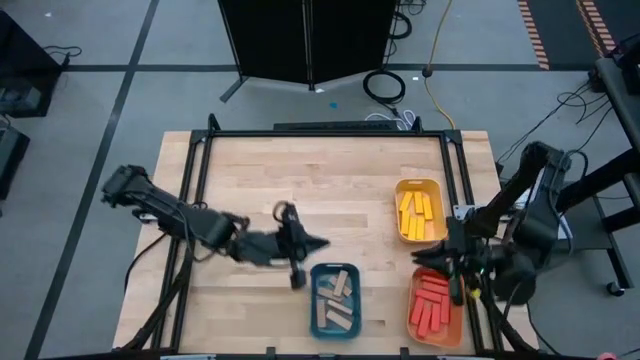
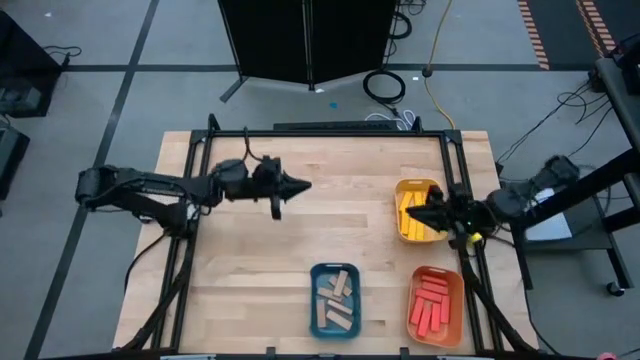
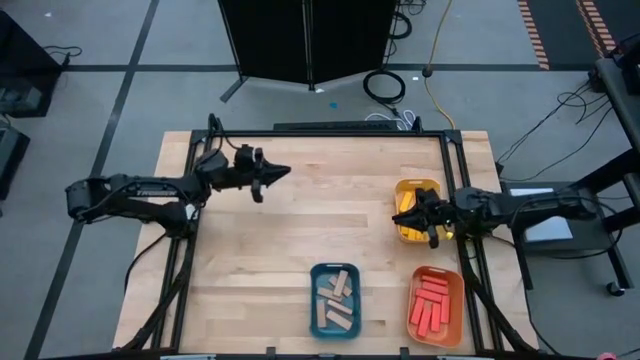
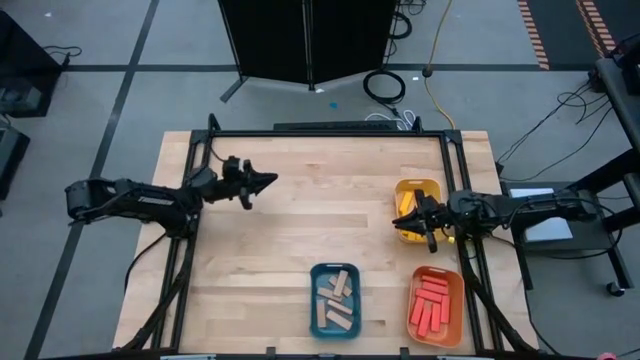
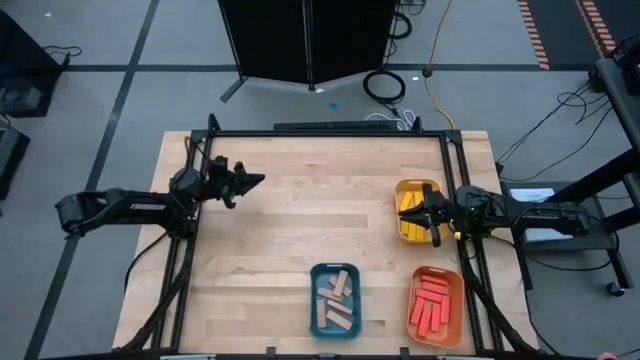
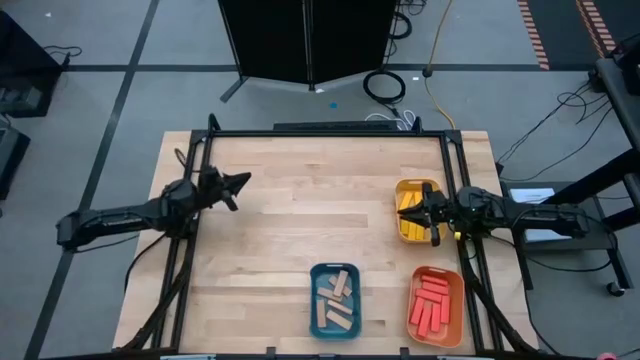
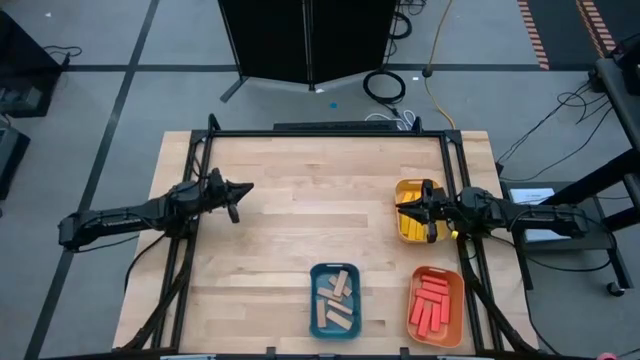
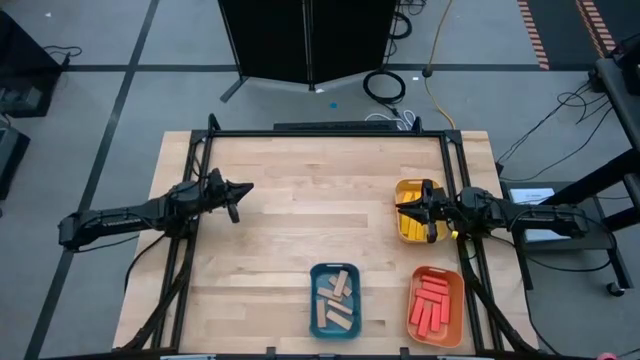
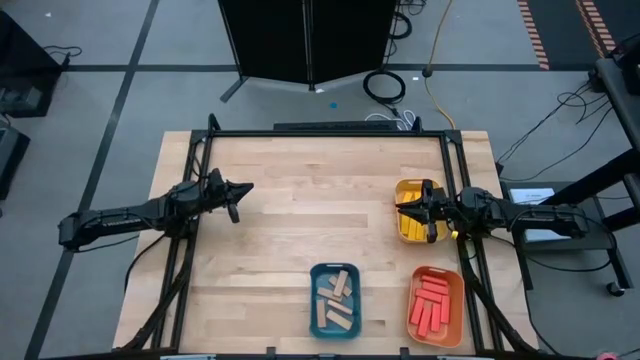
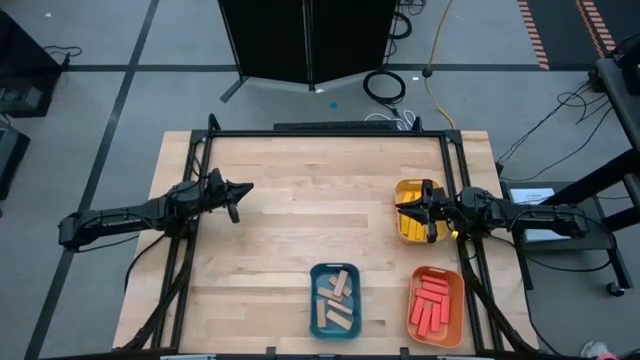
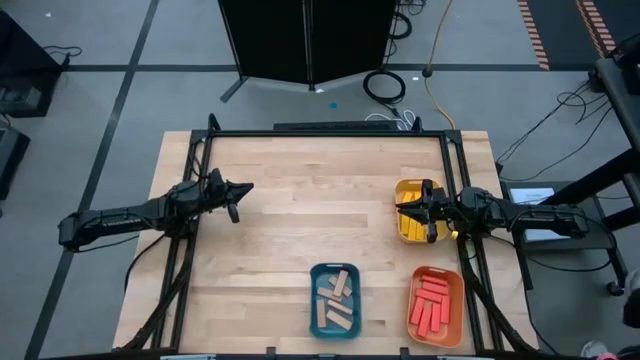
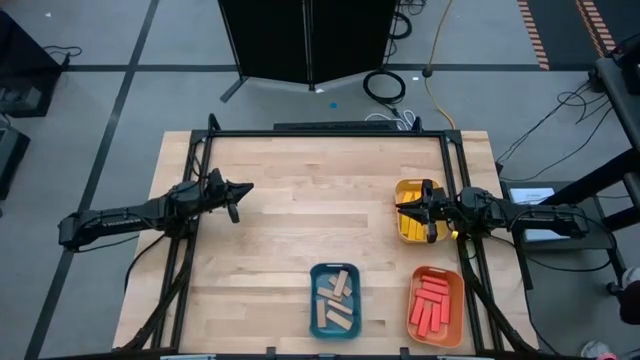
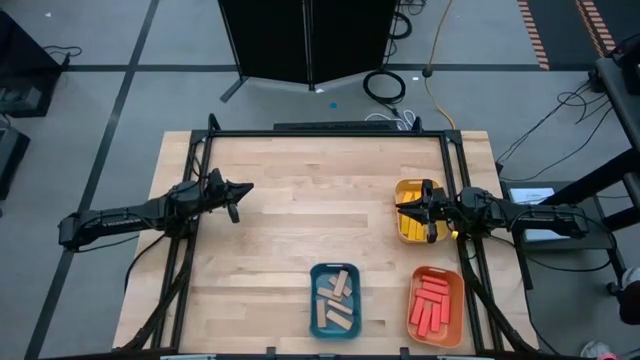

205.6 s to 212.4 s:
Task: Sort blocks
Return to Home Position

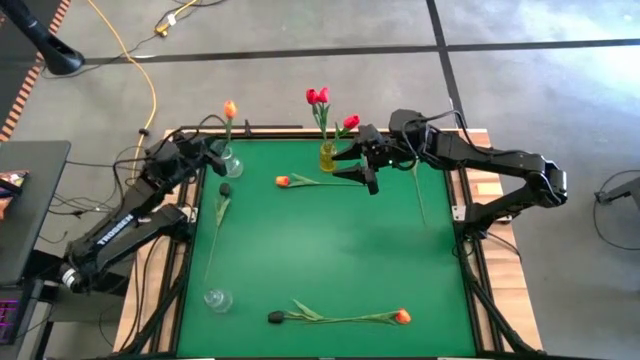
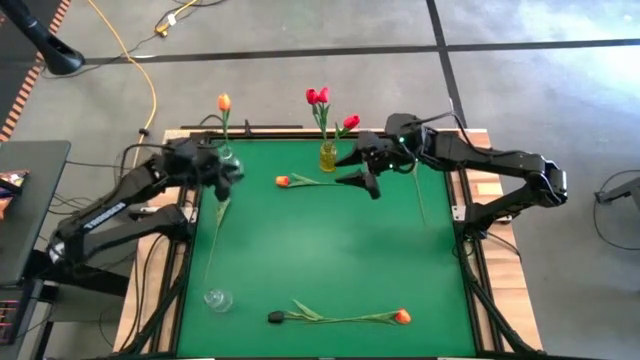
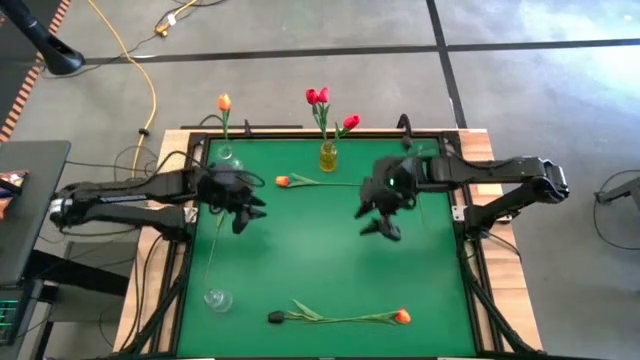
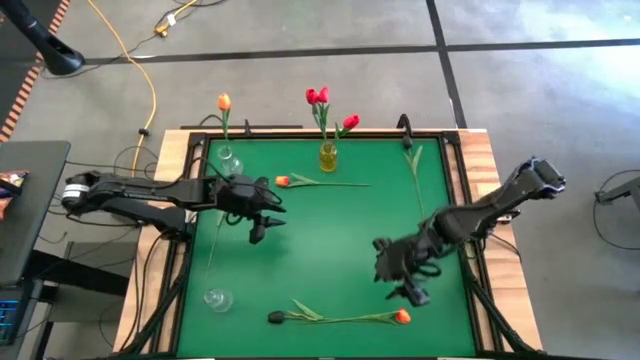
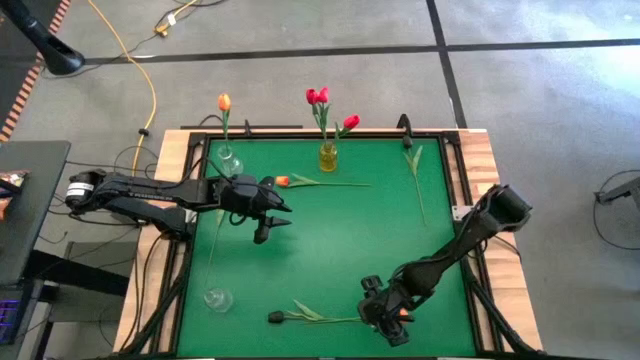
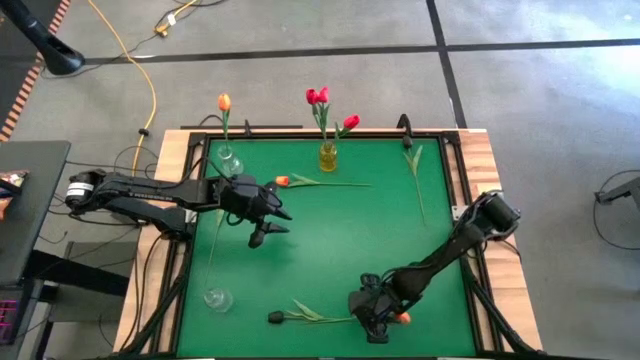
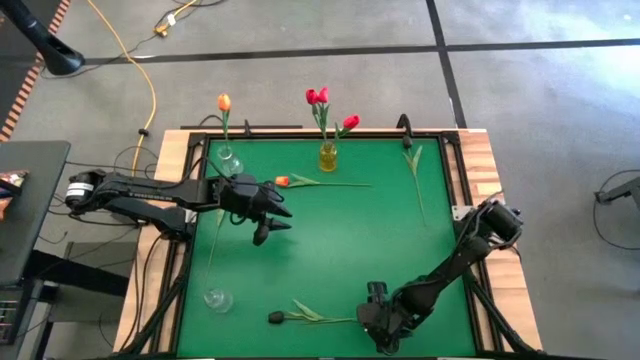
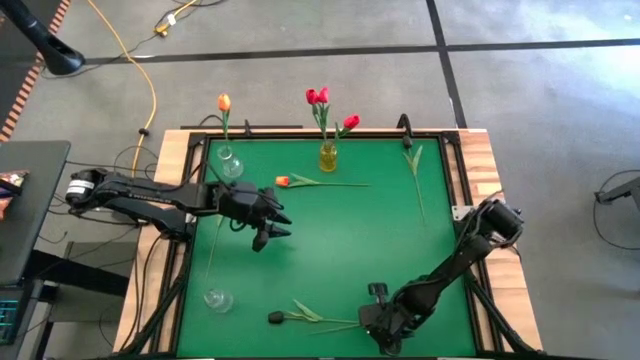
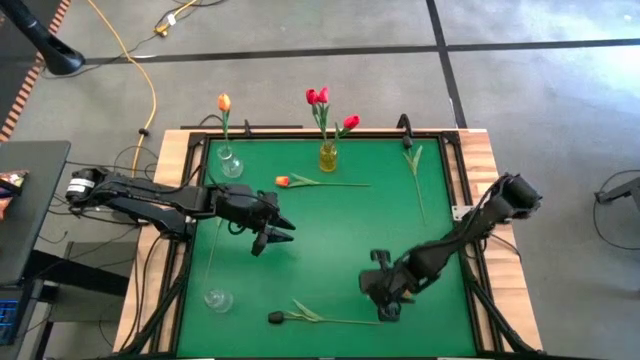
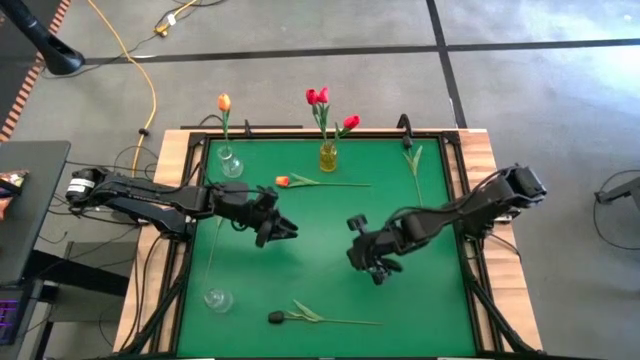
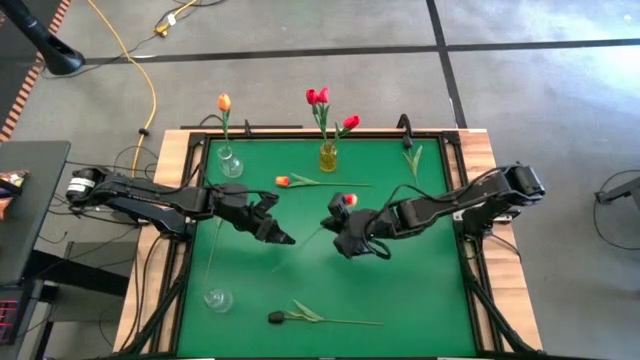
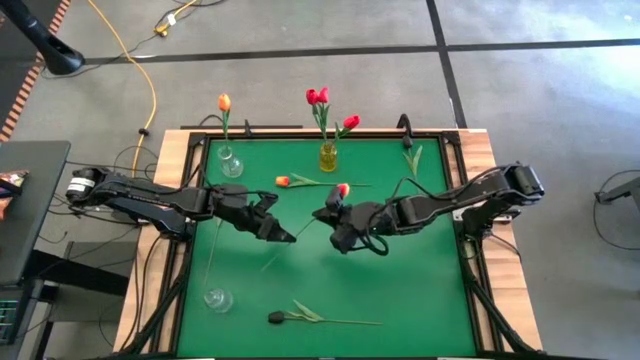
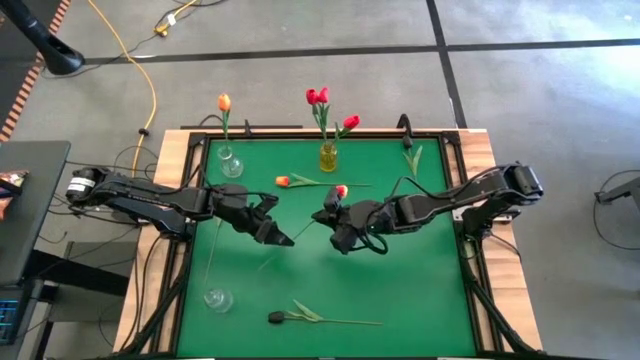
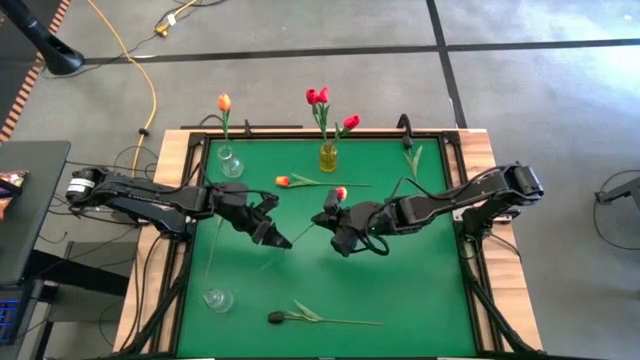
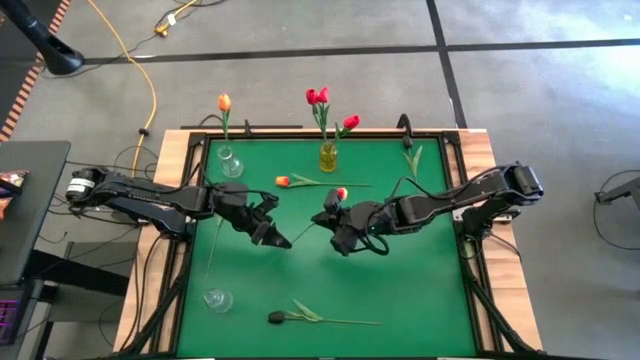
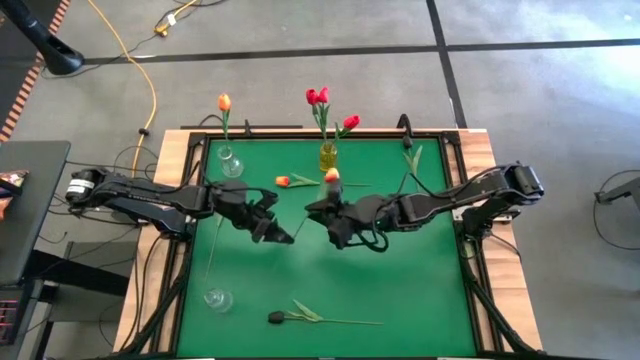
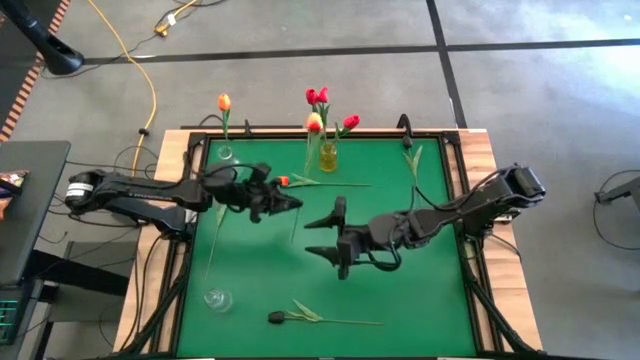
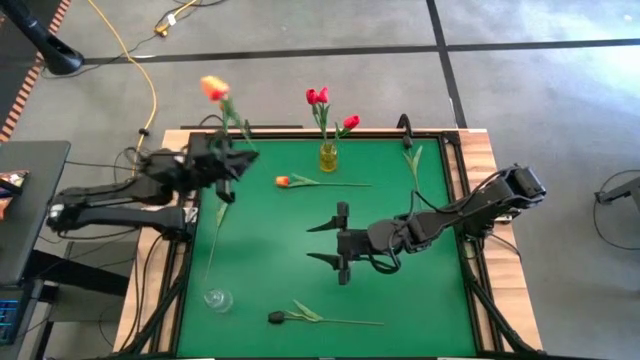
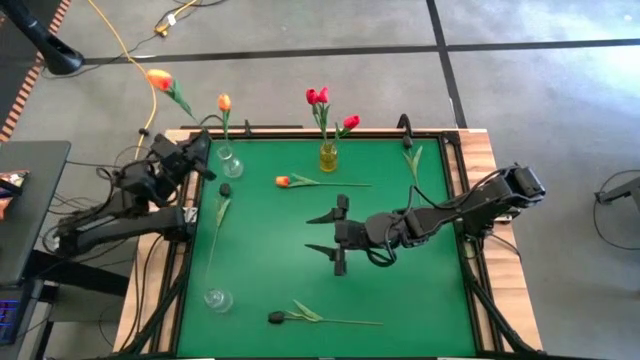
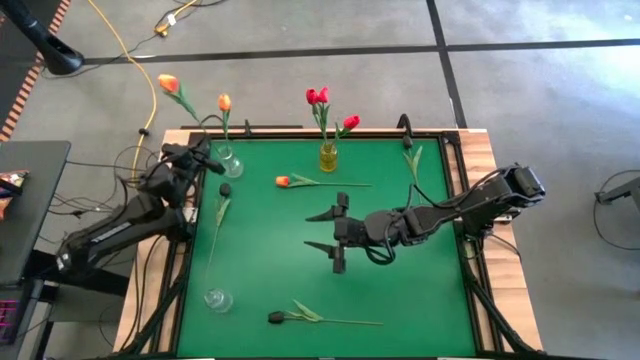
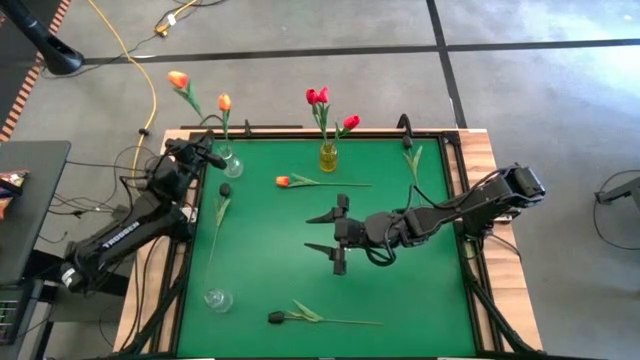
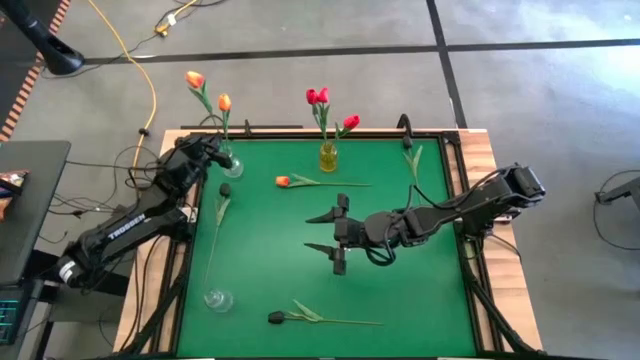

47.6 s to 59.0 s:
Task: Sort flowers into vase by color
Put the bottom orange flower into the top transparent vase
